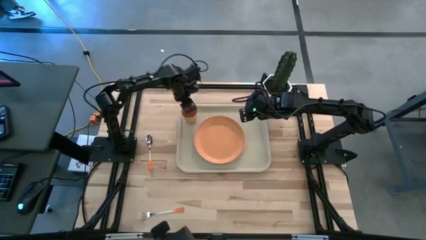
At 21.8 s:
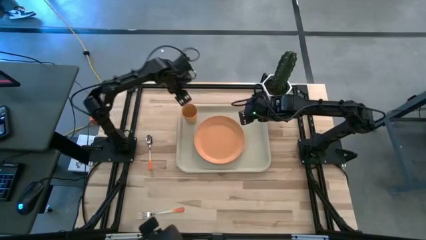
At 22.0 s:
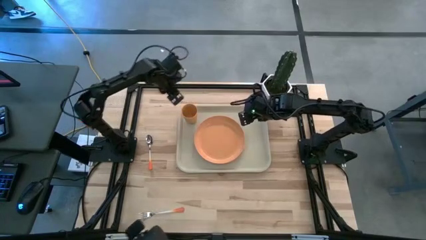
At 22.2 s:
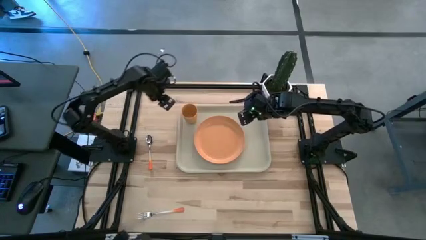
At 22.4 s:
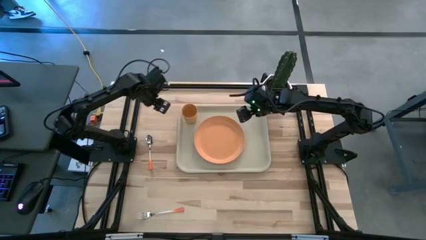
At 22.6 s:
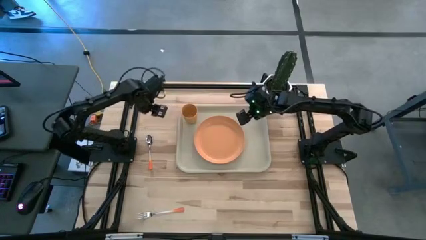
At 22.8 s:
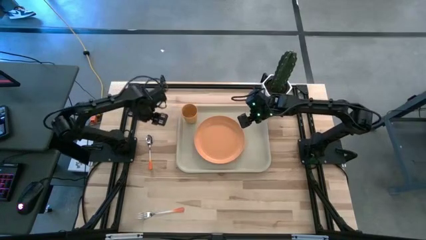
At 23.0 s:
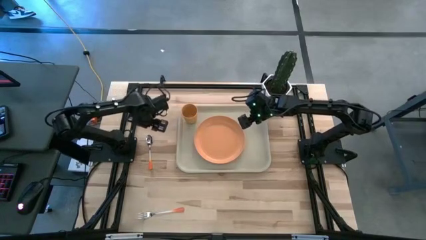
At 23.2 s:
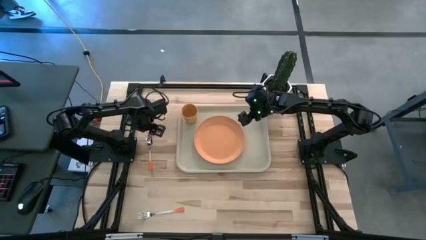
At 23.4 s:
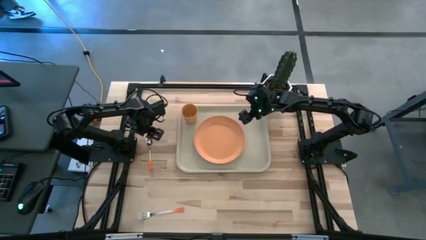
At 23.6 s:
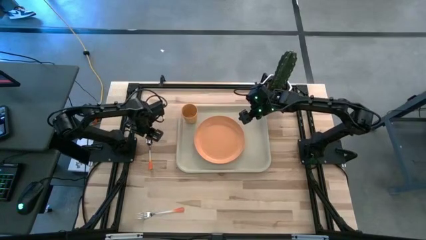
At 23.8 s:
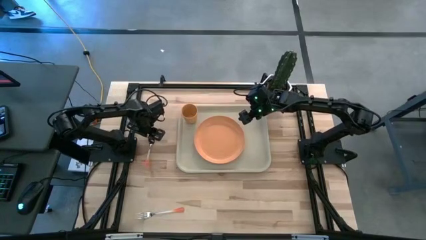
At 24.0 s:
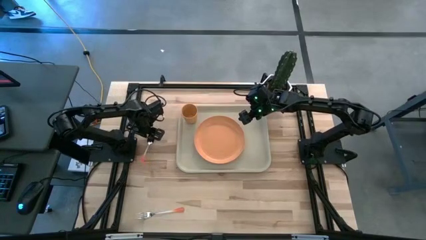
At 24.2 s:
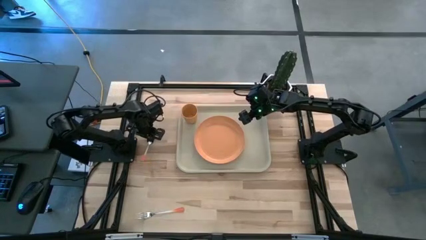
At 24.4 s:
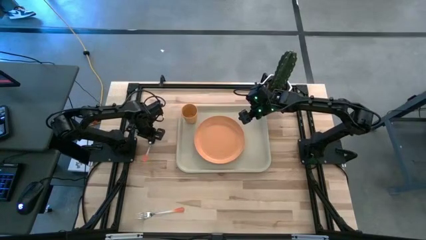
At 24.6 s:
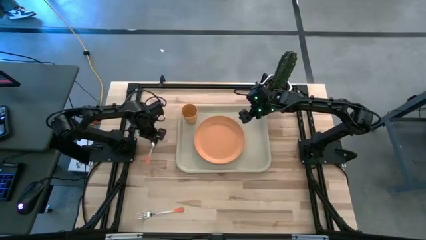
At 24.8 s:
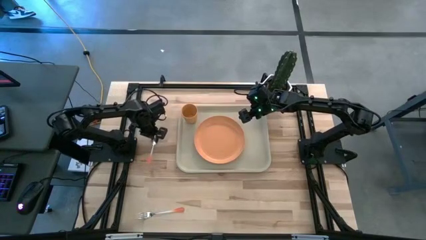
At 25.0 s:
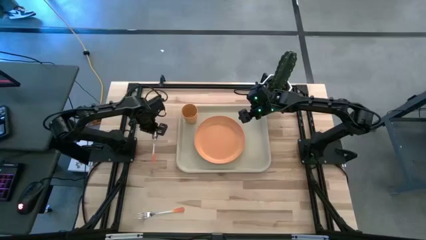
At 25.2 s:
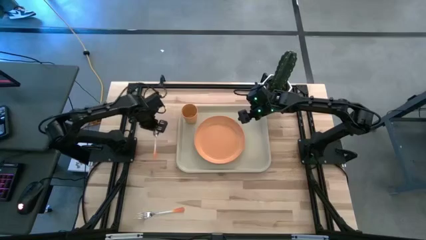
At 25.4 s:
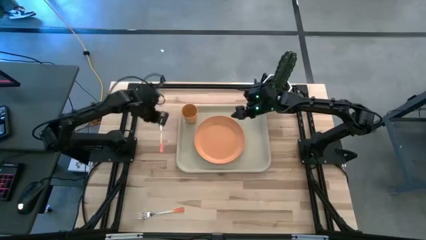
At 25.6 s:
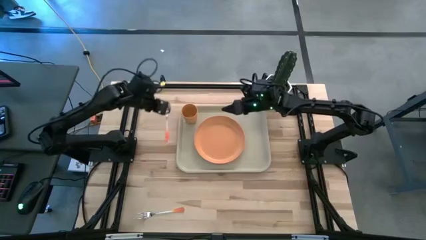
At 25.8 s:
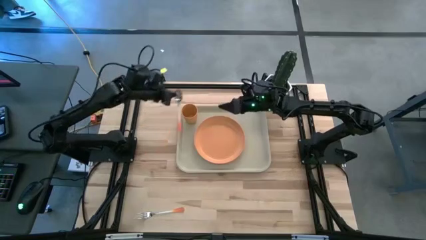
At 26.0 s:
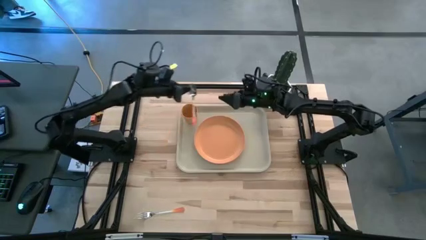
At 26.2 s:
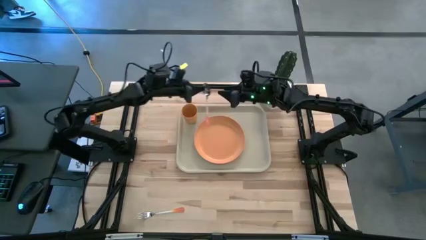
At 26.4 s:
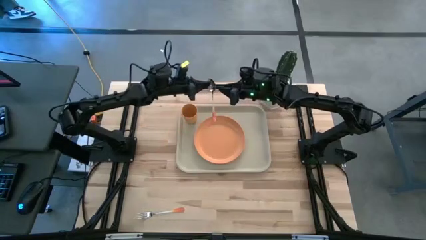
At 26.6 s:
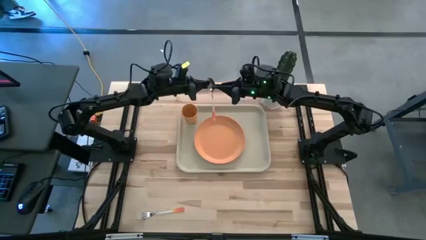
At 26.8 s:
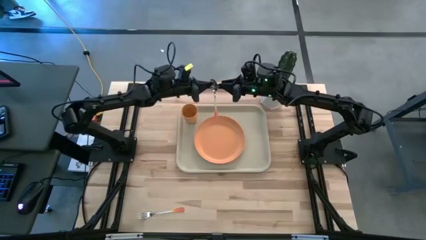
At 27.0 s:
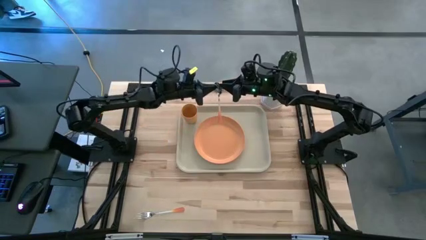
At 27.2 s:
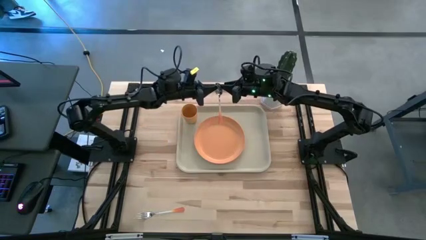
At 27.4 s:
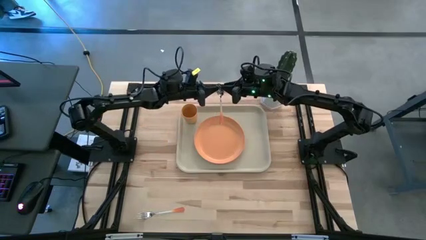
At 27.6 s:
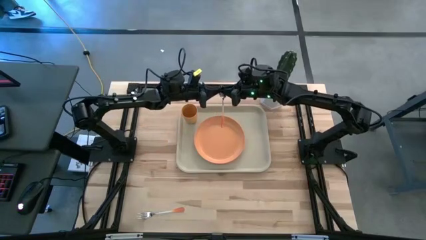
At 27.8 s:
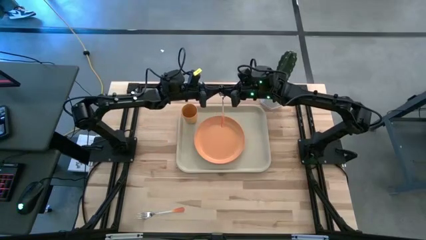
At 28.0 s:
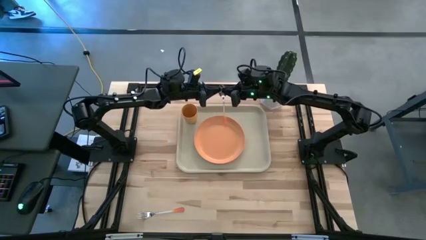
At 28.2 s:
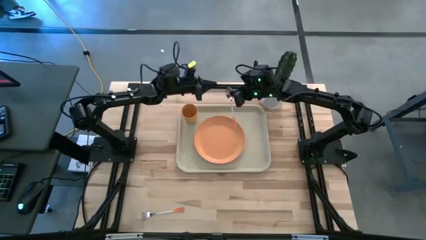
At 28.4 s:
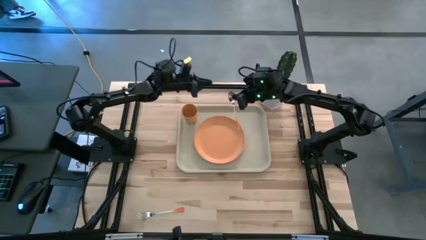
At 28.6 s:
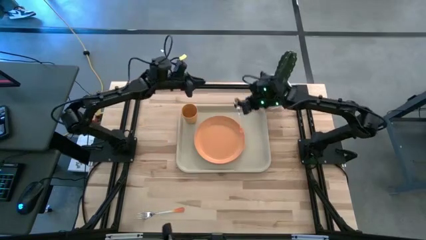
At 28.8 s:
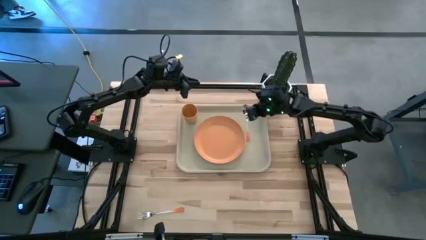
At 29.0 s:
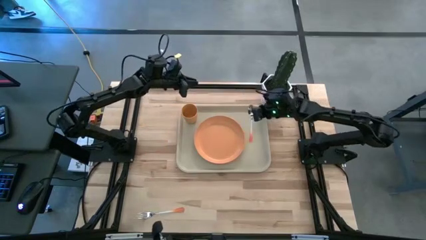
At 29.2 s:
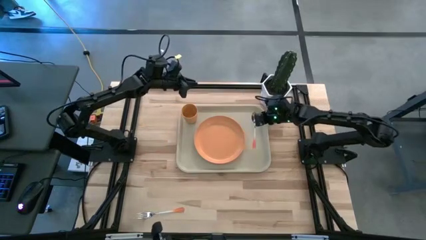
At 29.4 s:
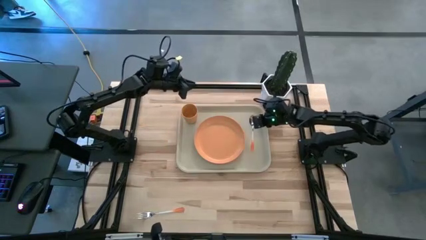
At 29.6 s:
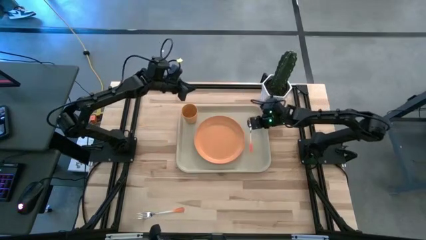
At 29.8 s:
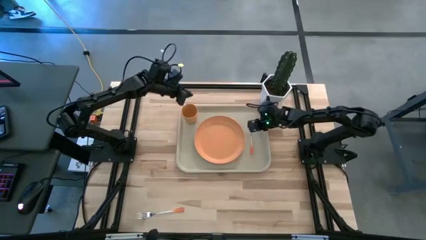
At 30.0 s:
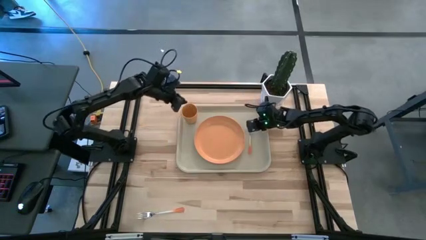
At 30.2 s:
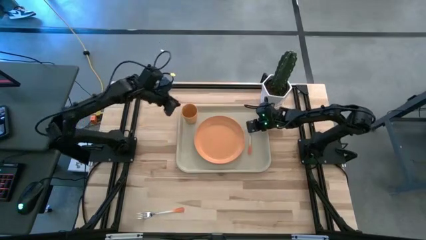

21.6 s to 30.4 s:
Task: Pick and place plate/cup/fork/spoon on tray
Put the orange spoon on the gray tray to the right of the orange plate

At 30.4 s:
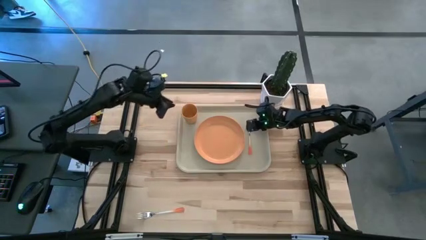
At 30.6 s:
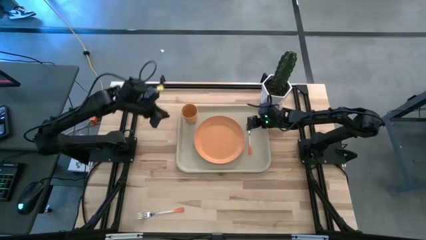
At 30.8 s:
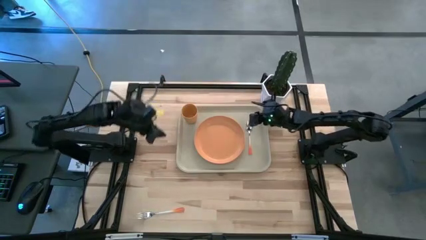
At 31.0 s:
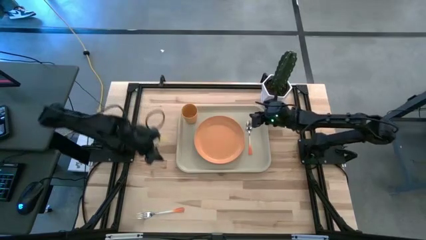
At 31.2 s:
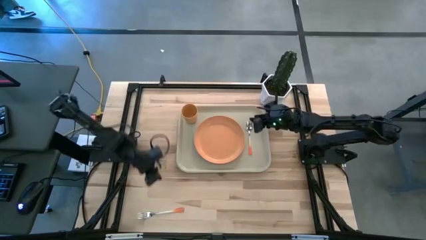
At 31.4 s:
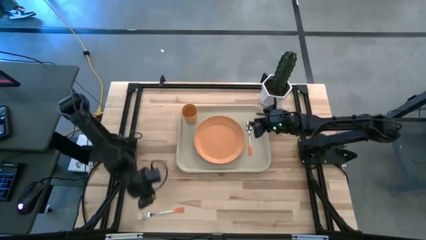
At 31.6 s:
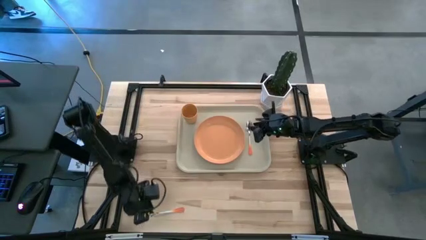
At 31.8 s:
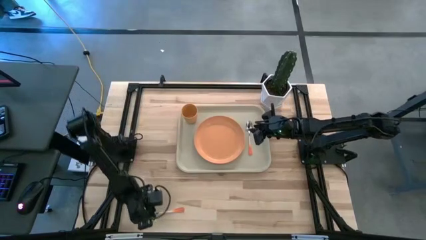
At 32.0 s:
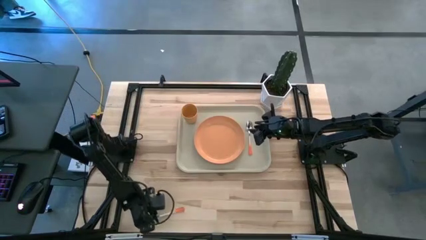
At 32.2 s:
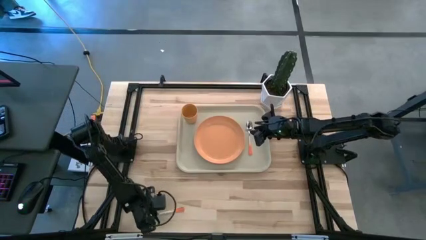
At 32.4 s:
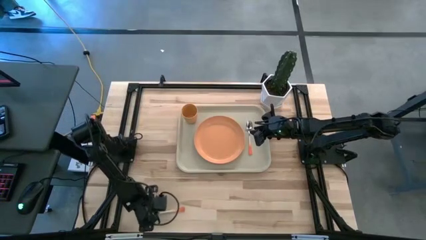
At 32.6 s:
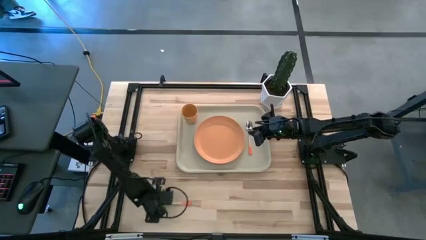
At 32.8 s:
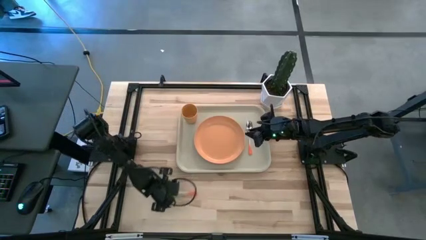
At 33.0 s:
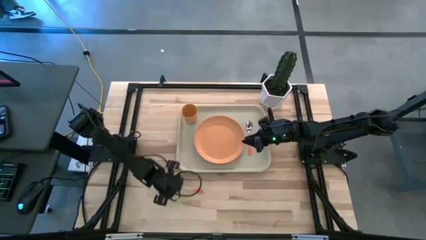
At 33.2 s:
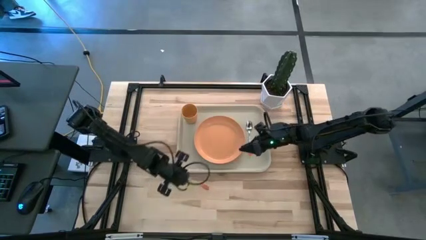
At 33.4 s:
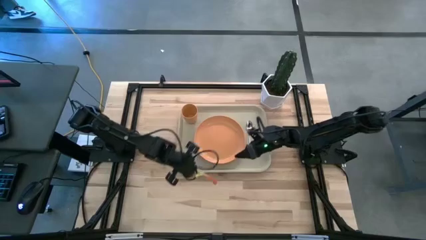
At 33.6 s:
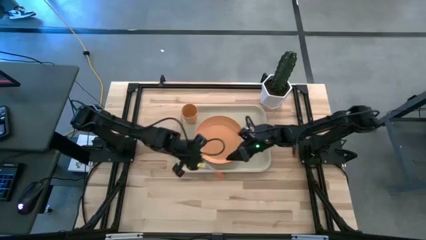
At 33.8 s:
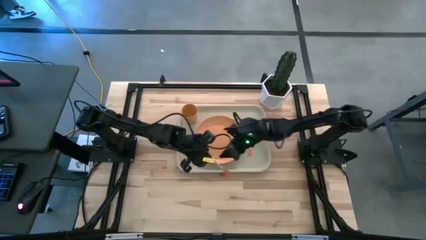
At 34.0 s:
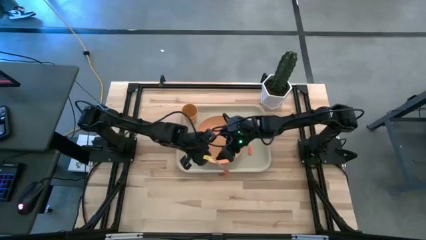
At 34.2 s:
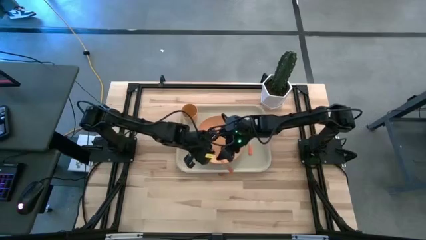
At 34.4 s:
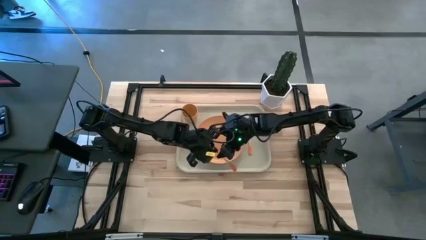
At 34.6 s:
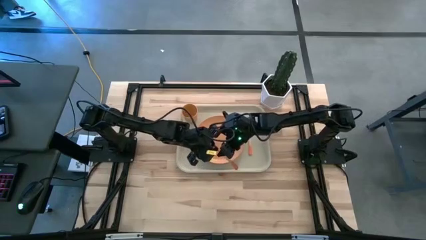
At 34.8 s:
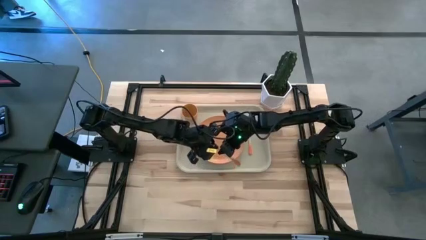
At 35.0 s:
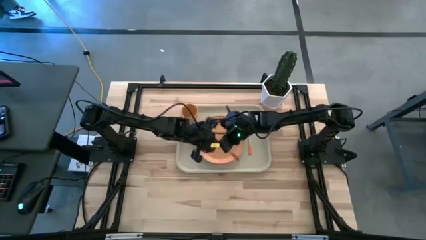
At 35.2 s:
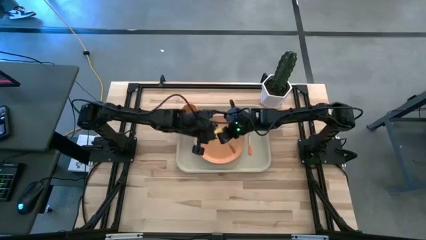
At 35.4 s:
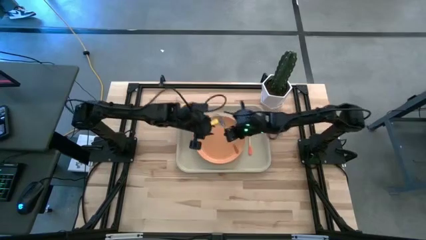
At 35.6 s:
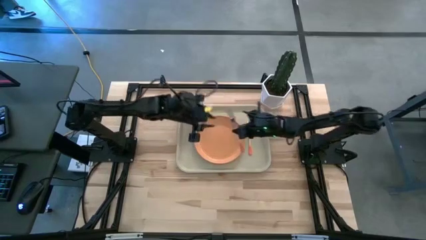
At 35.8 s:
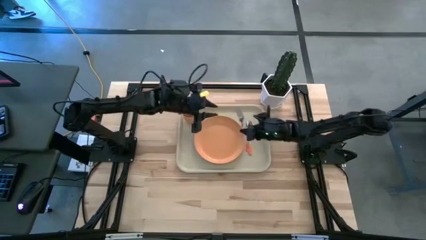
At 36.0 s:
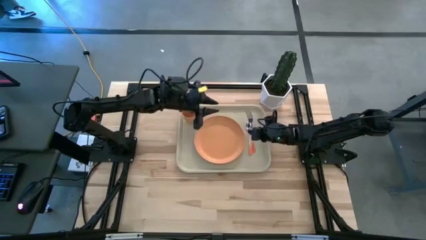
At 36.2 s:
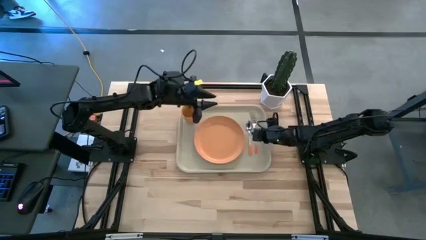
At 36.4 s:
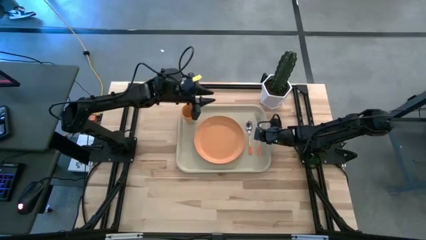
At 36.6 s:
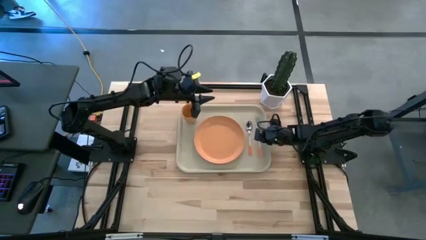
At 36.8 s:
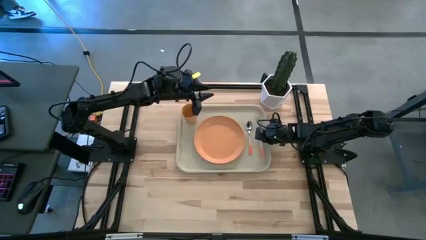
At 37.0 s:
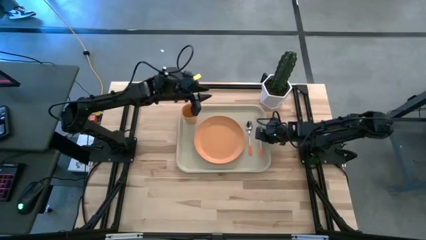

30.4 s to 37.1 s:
Put the orange fork on the gray tray to the right of the orange spoon
